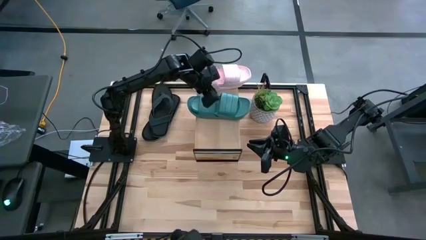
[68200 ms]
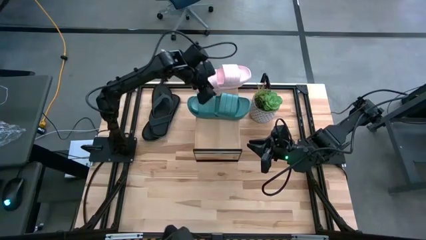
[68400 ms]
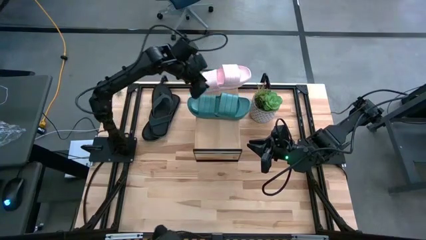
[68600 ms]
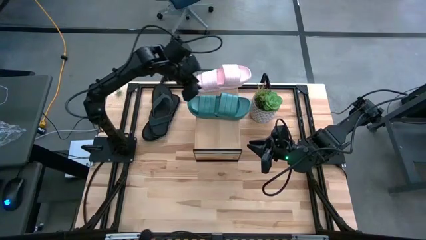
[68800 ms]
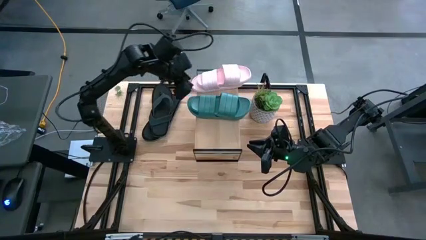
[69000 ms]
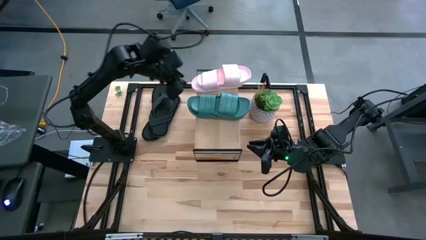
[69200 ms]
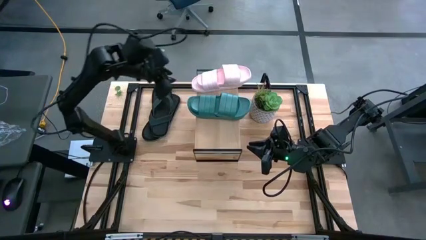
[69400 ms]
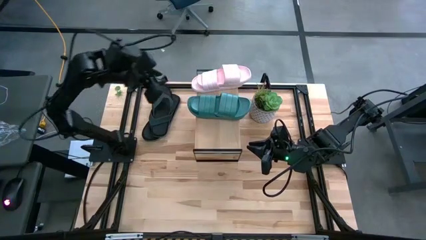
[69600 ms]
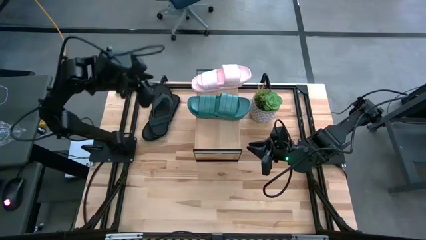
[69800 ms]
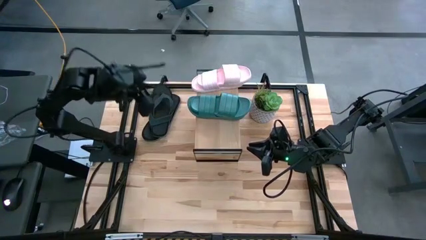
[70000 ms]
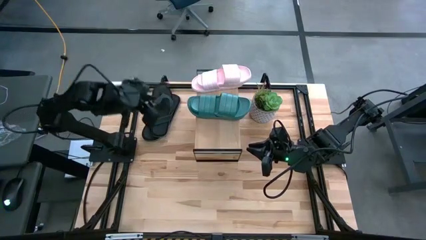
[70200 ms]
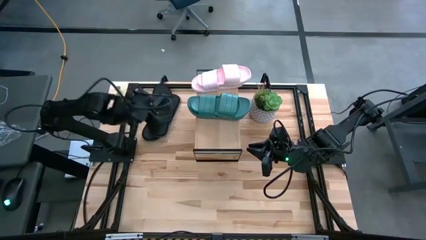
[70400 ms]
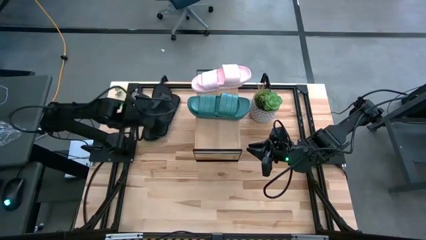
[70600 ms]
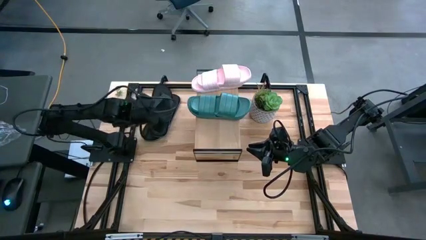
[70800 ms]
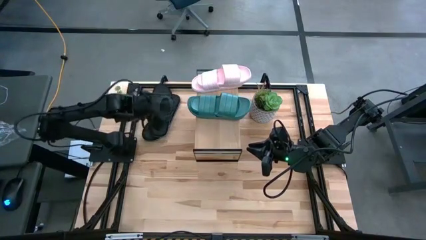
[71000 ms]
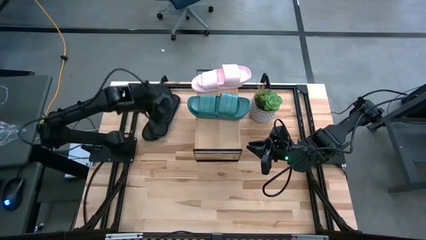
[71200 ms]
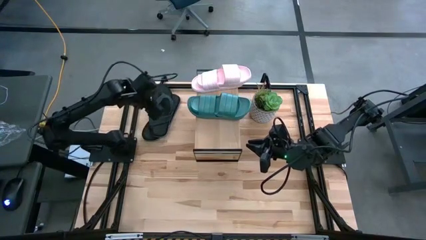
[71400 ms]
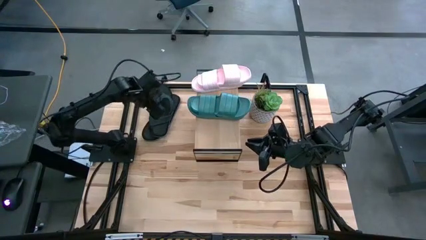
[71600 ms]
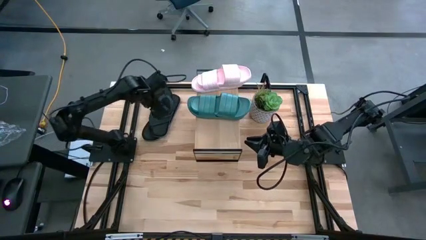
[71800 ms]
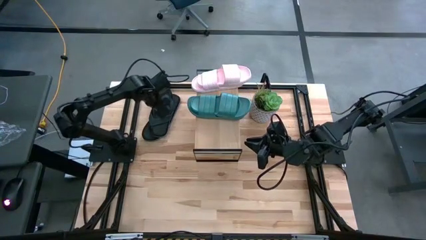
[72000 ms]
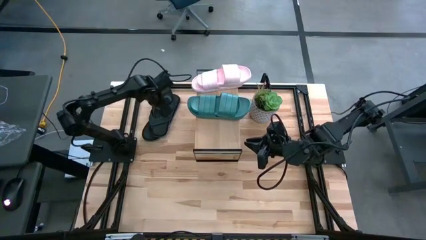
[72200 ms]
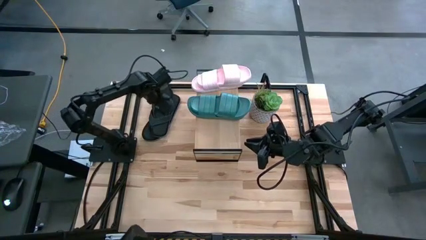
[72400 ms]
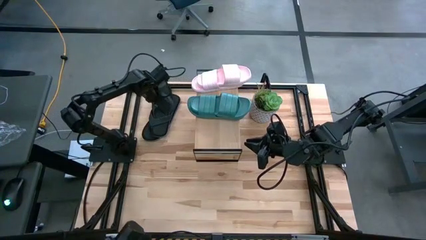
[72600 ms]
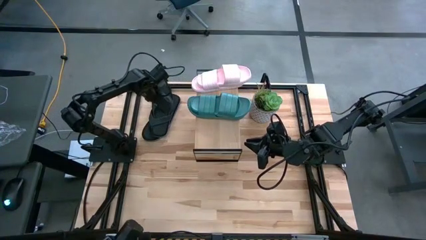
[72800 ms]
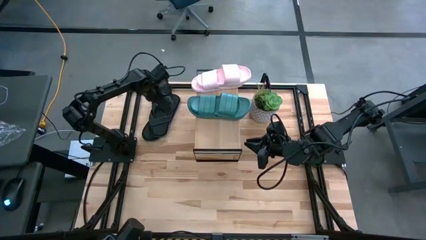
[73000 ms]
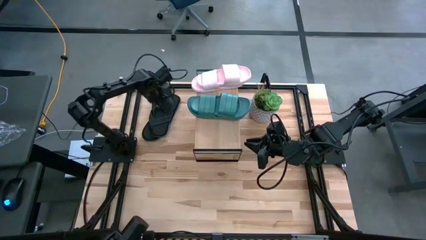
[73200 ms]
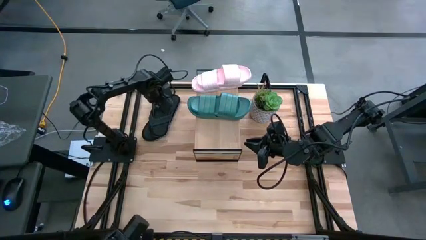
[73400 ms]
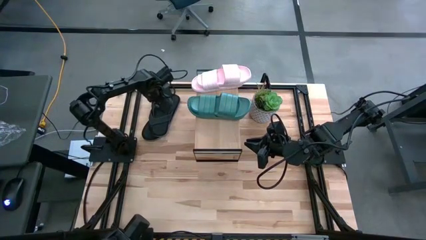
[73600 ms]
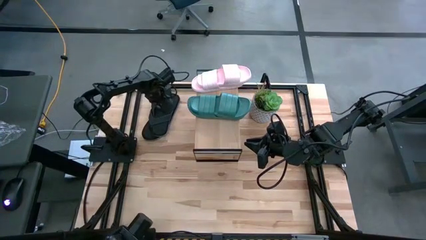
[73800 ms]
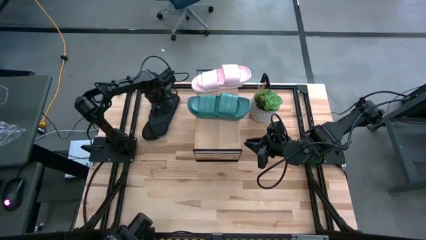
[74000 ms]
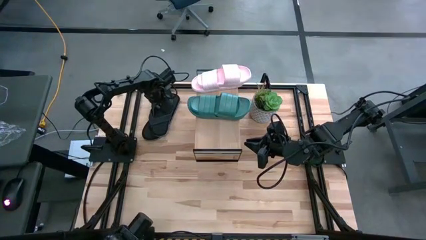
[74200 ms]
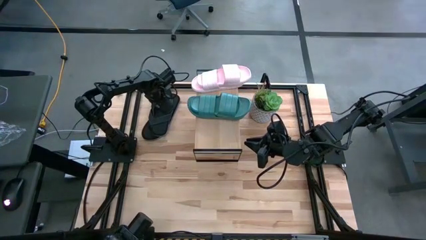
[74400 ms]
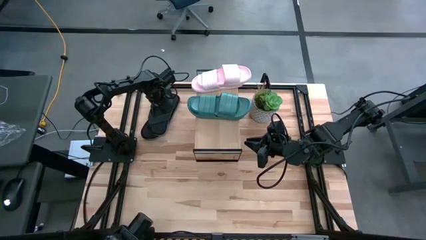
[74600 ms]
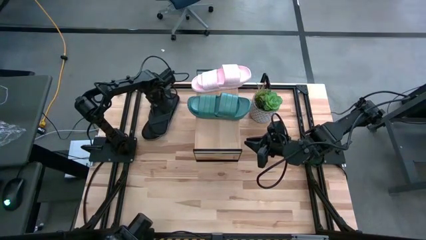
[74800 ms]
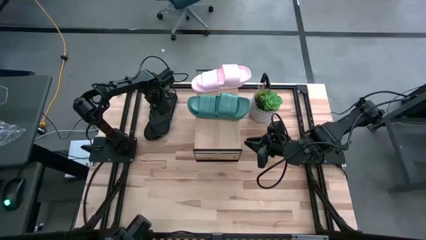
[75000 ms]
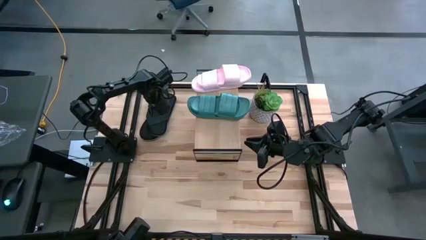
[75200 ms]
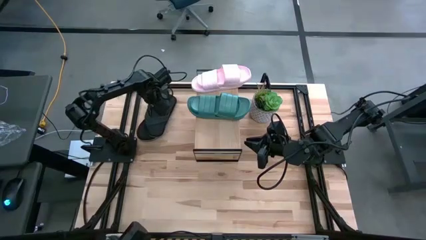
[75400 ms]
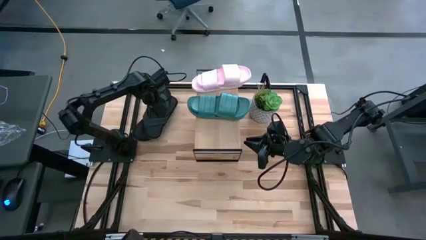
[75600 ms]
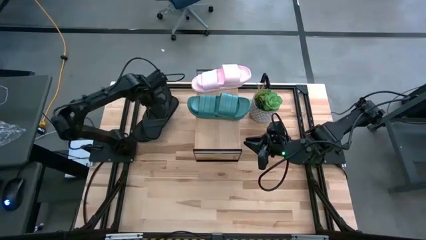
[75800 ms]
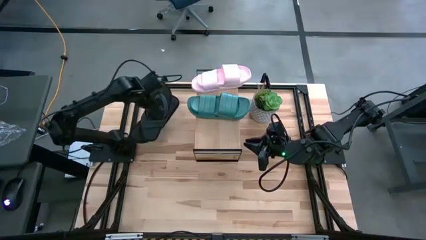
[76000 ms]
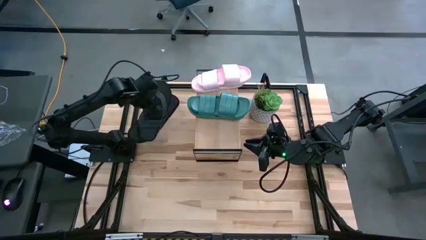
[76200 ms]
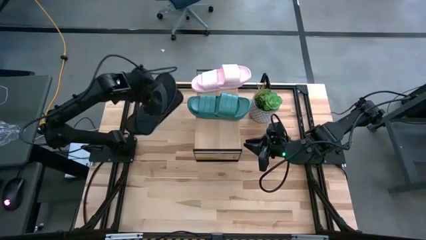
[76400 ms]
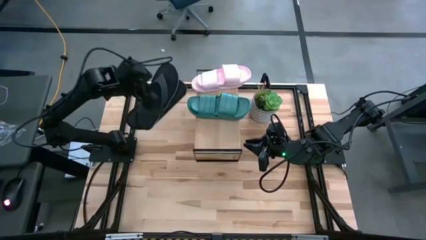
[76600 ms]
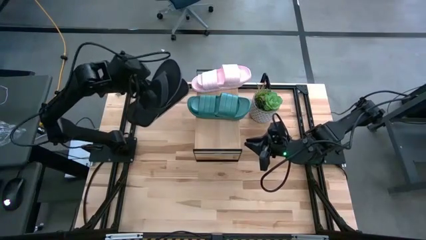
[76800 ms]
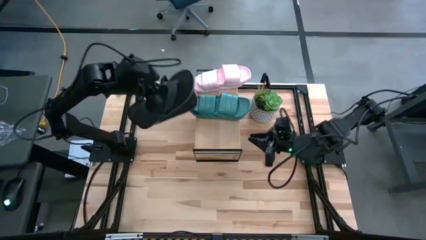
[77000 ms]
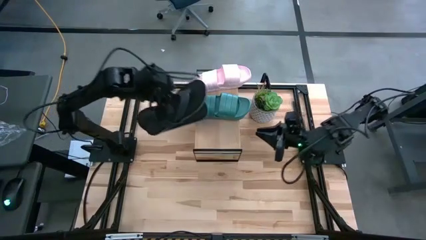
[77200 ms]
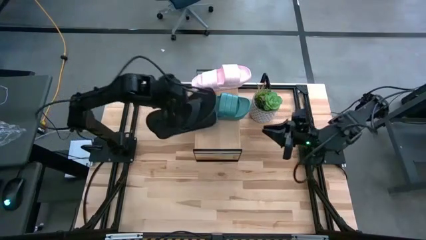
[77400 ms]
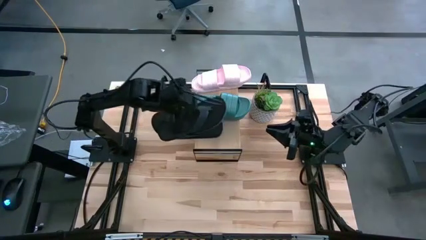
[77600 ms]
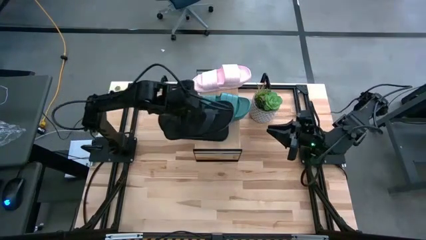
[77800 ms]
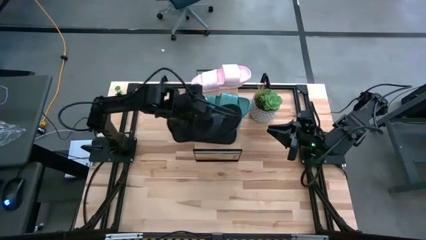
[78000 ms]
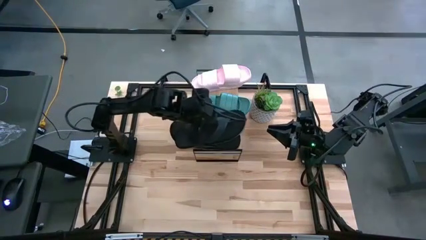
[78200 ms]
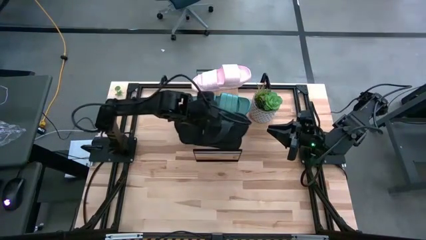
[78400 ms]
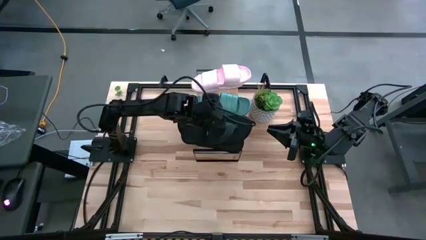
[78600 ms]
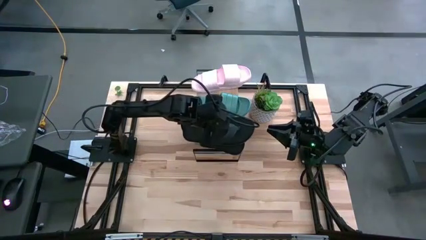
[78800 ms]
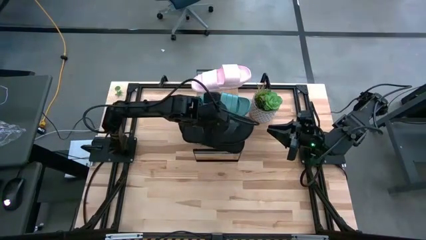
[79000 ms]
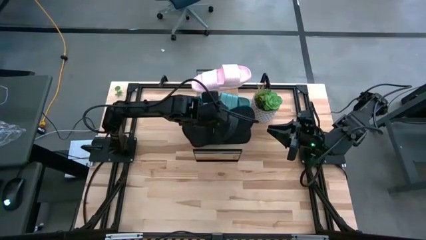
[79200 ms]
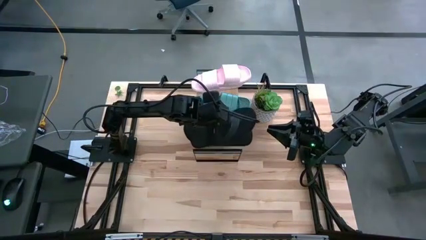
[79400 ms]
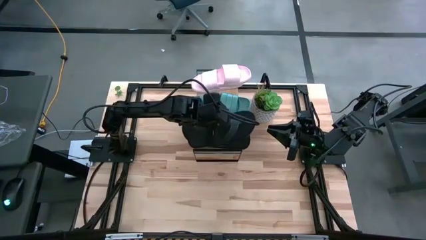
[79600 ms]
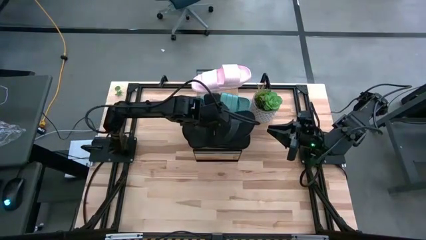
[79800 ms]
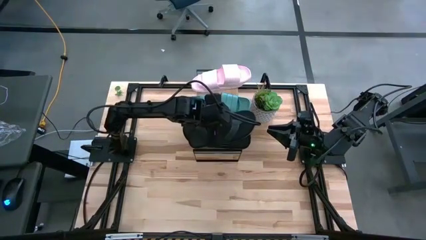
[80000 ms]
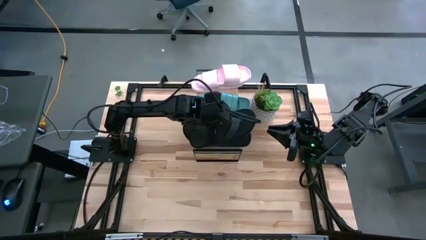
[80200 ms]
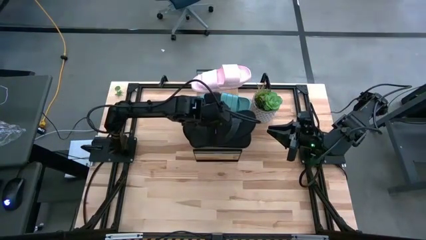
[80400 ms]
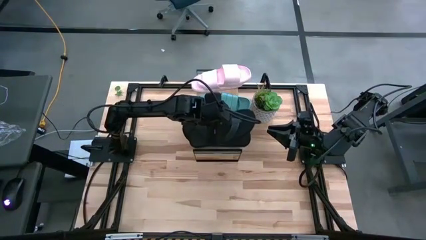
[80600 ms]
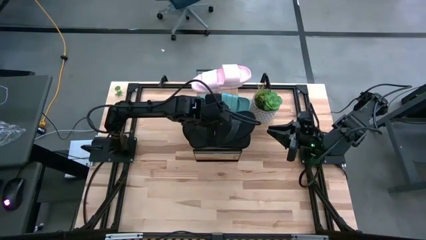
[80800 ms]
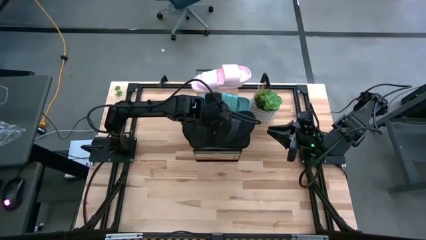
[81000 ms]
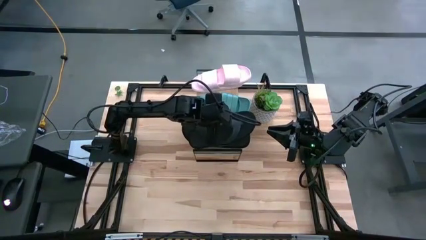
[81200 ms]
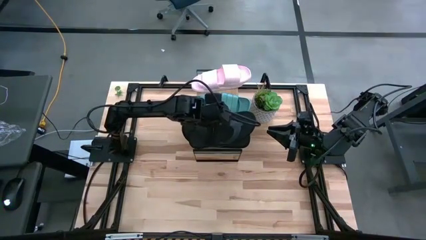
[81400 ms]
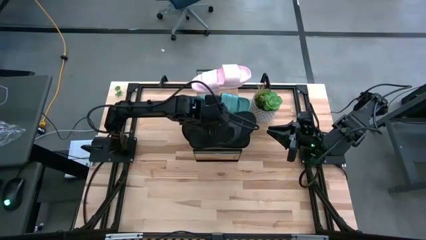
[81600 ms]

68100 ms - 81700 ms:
Task: Pick and place slippers onto the shelf
Put the black pair of slippers on the shelf
